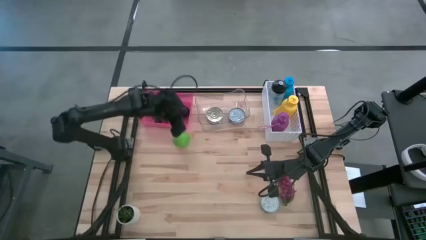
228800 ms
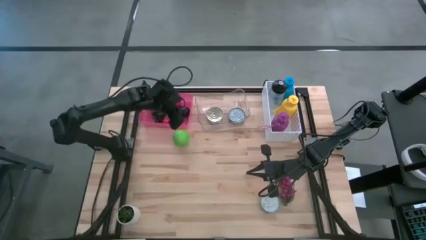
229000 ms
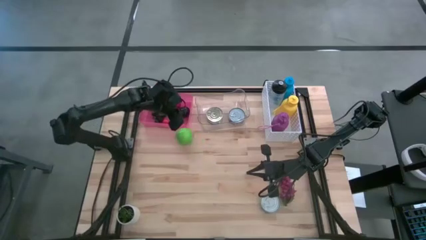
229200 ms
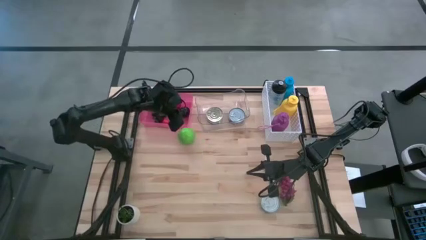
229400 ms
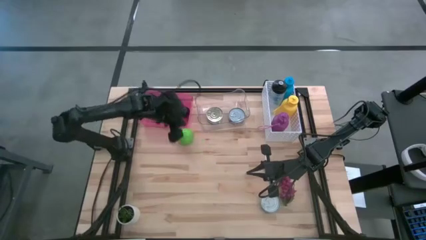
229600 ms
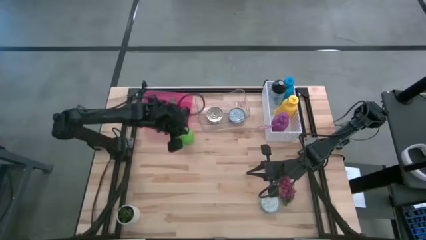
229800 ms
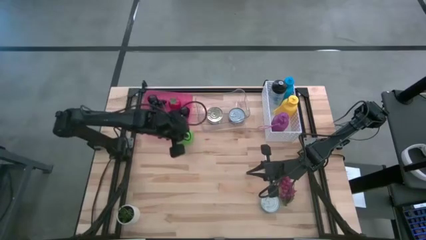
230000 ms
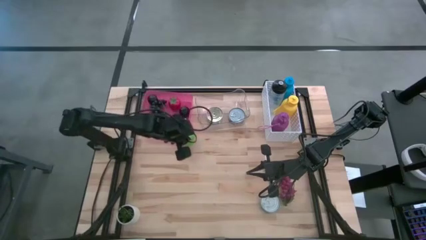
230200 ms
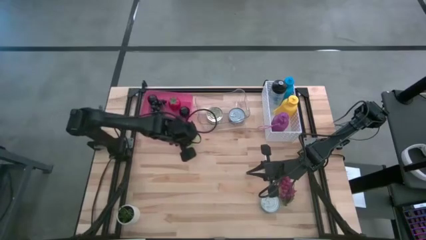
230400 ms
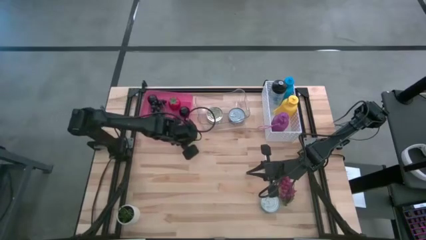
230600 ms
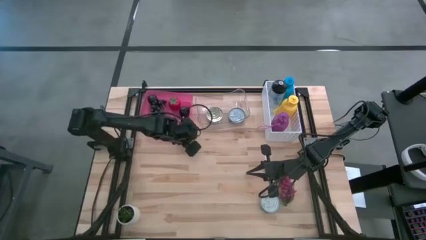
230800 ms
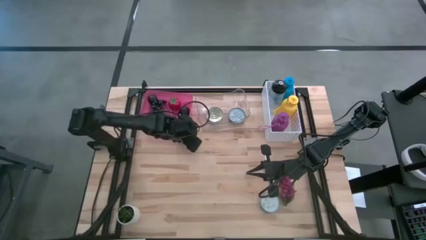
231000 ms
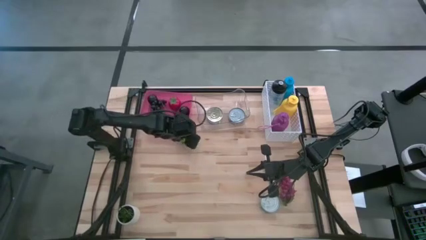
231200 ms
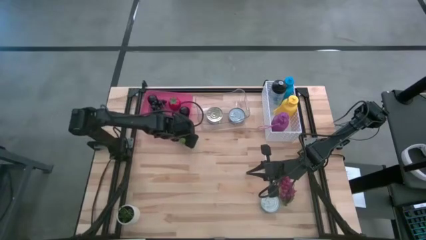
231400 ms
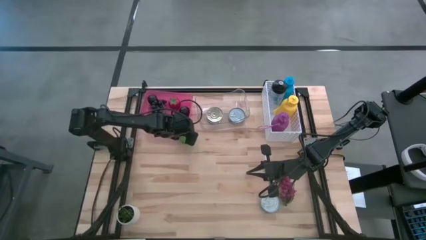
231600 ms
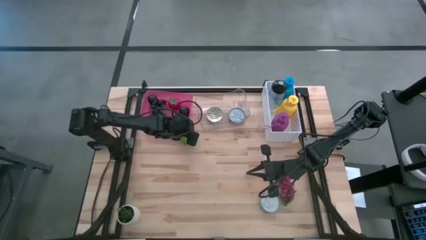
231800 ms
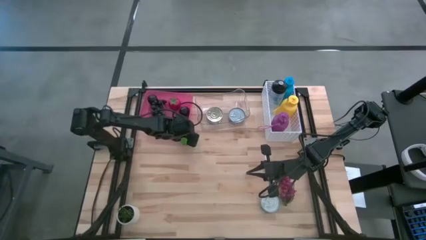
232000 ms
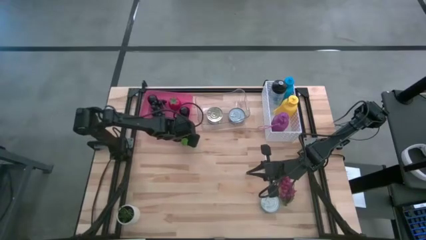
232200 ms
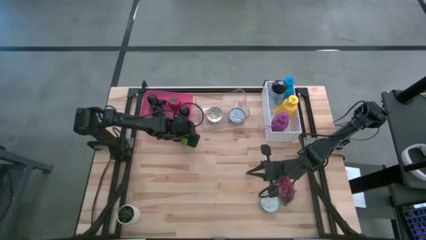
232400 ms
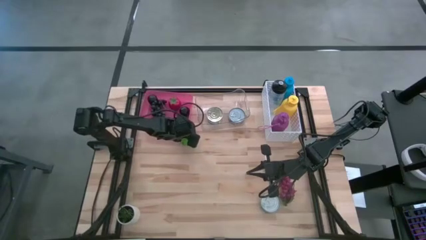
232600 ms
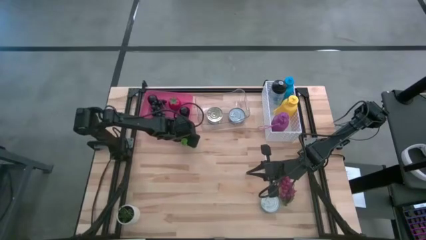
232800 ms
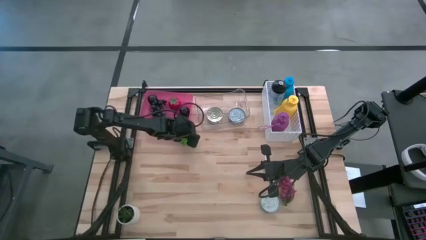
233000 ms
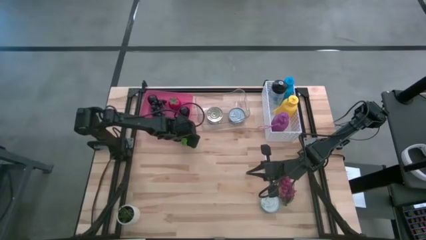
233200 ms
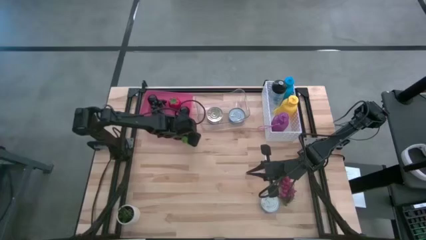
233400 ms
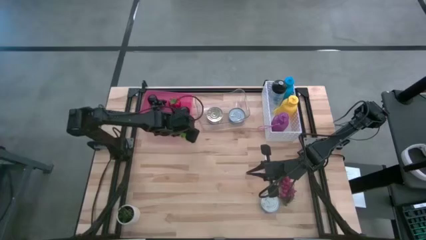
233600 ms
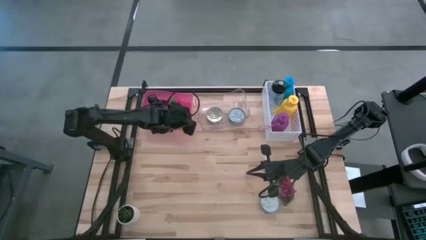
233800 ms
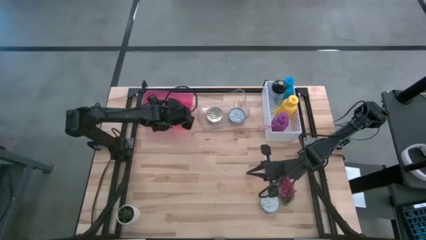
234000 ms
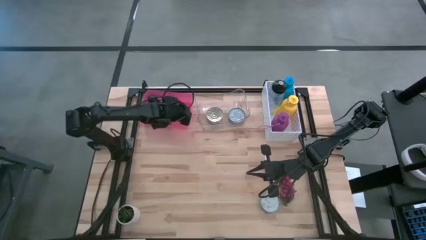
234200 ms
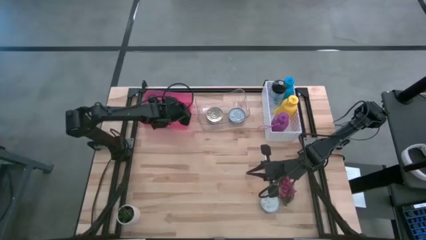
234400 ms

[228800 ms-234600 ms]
Task: Pick & Place Food Item
Put the green apple into the pink bin

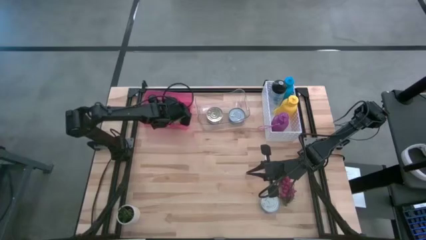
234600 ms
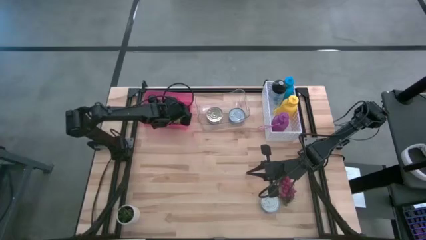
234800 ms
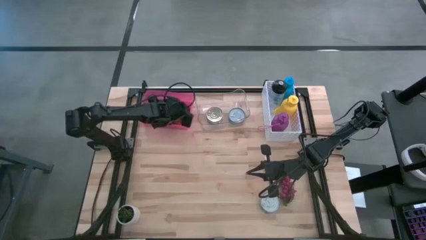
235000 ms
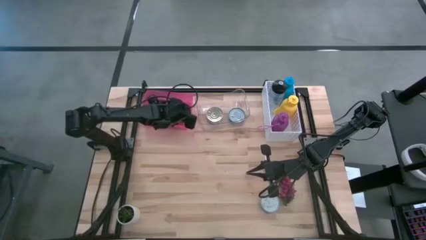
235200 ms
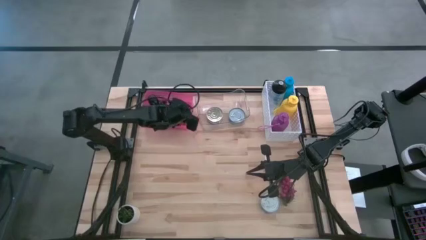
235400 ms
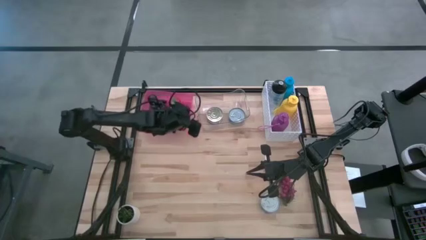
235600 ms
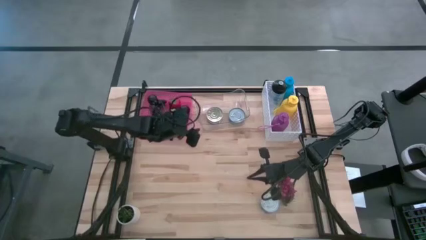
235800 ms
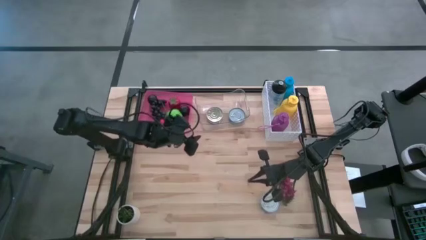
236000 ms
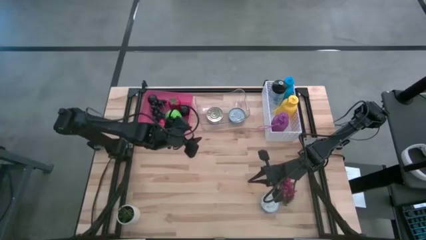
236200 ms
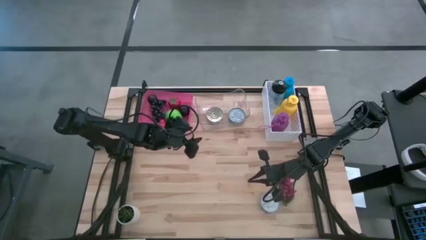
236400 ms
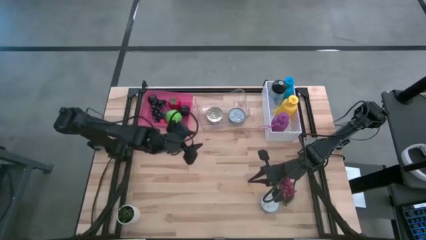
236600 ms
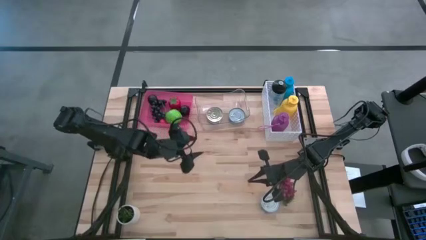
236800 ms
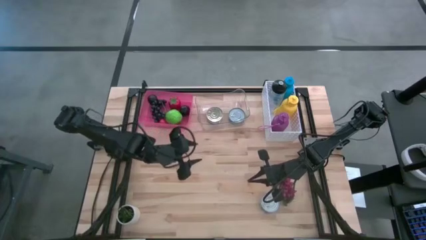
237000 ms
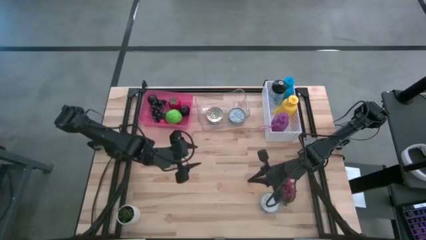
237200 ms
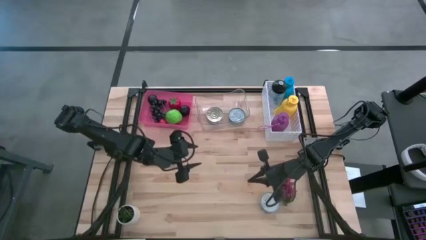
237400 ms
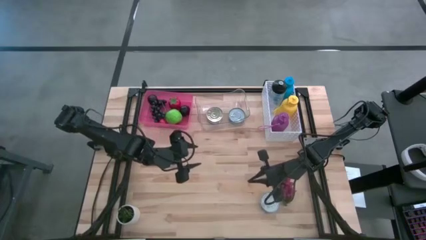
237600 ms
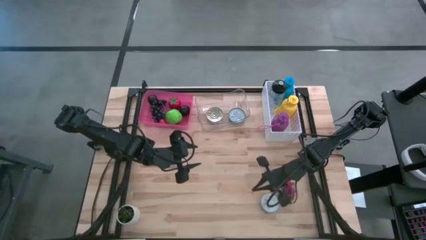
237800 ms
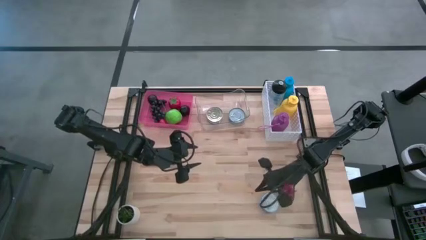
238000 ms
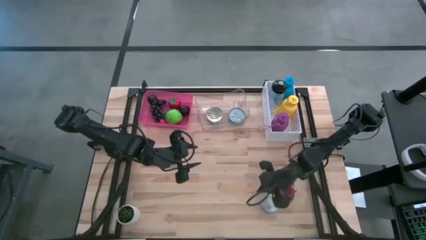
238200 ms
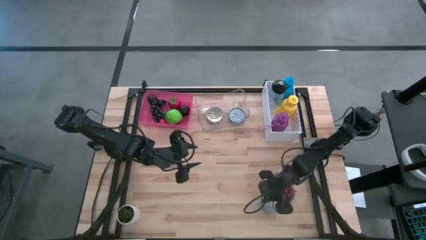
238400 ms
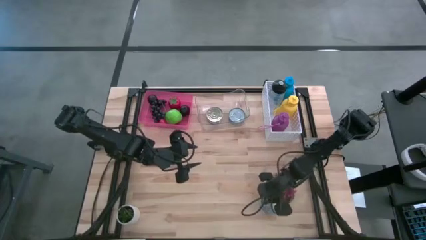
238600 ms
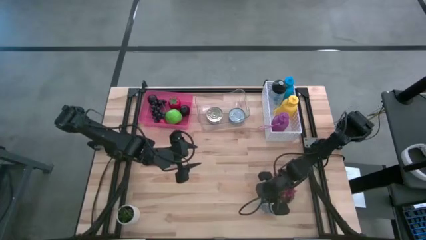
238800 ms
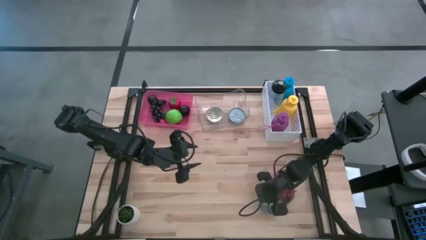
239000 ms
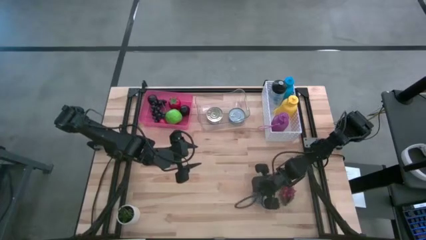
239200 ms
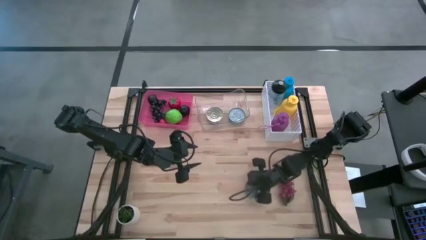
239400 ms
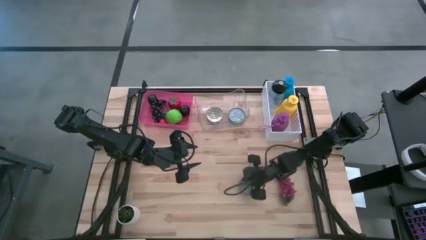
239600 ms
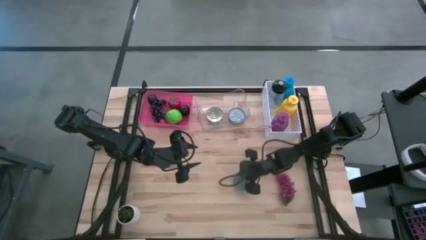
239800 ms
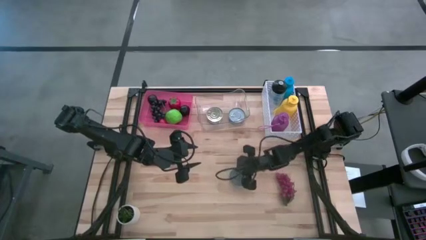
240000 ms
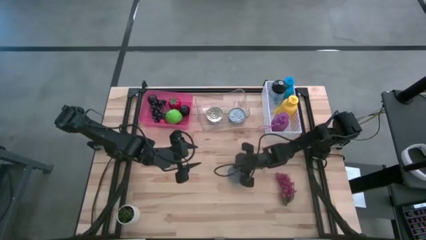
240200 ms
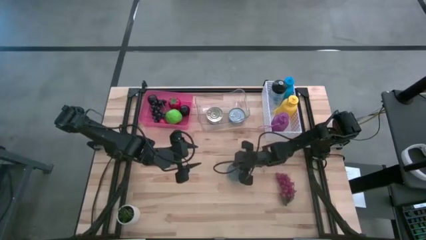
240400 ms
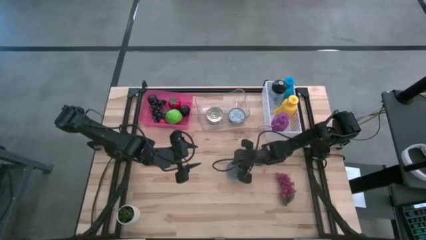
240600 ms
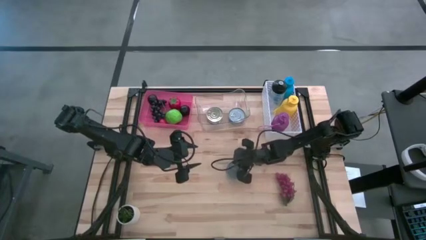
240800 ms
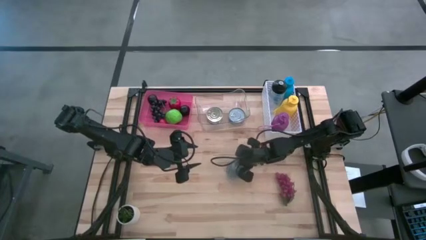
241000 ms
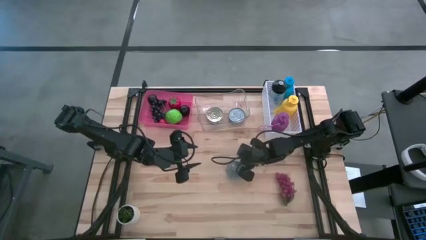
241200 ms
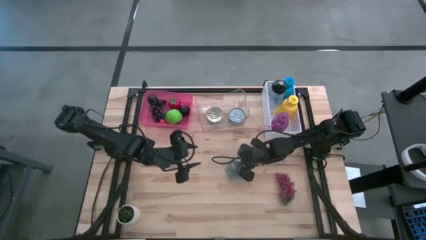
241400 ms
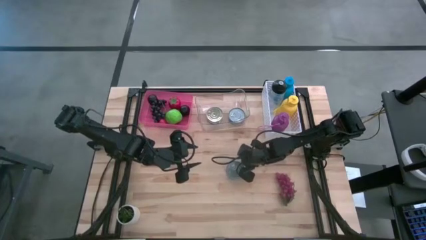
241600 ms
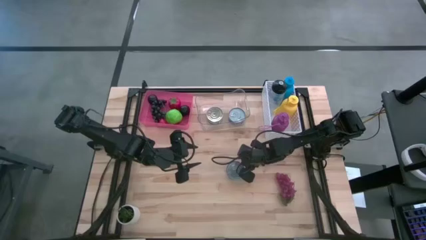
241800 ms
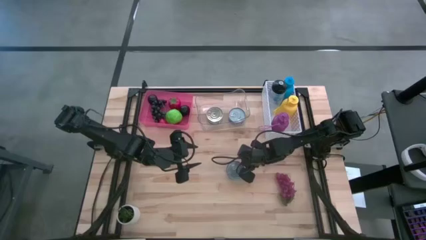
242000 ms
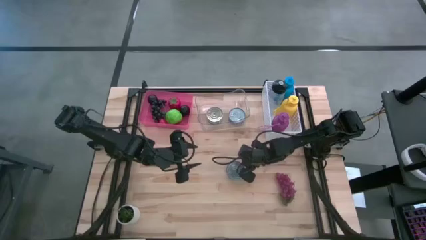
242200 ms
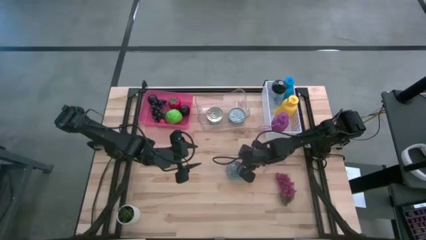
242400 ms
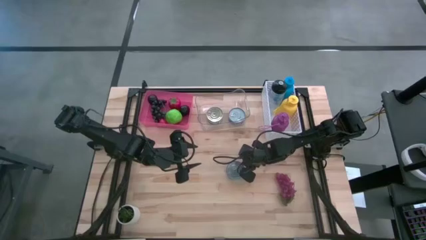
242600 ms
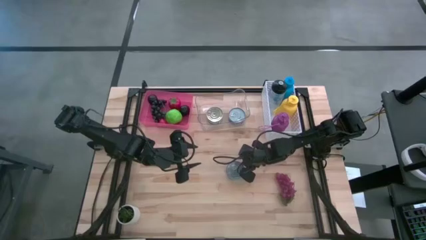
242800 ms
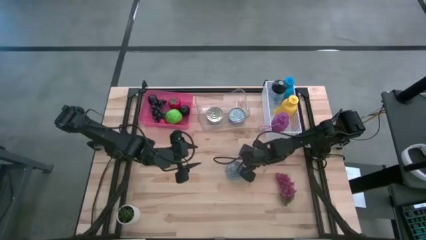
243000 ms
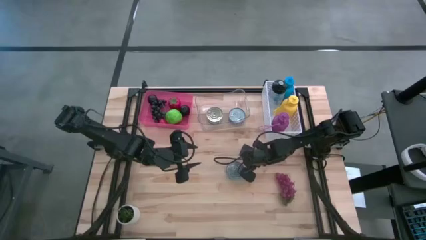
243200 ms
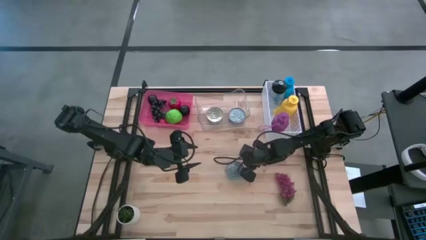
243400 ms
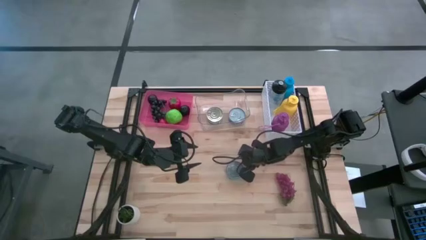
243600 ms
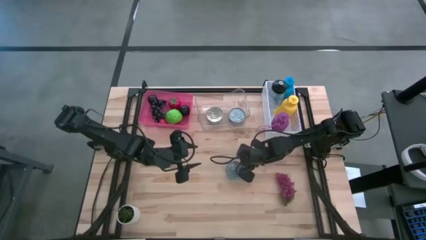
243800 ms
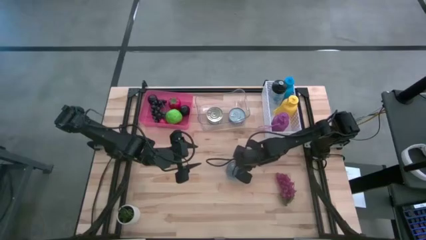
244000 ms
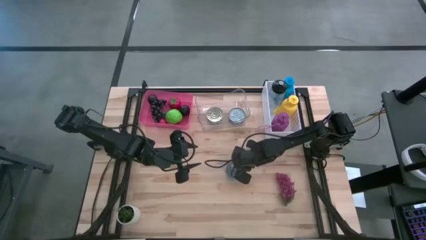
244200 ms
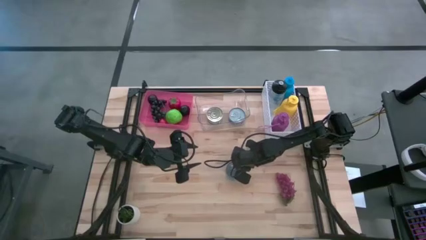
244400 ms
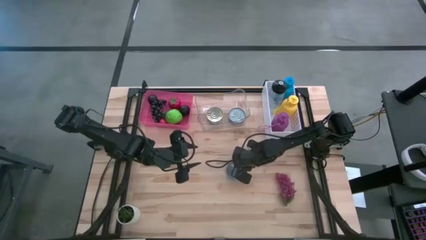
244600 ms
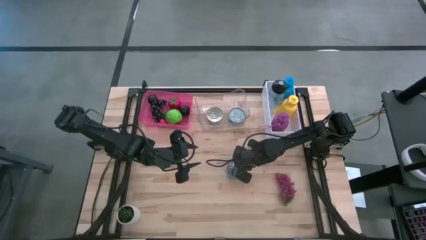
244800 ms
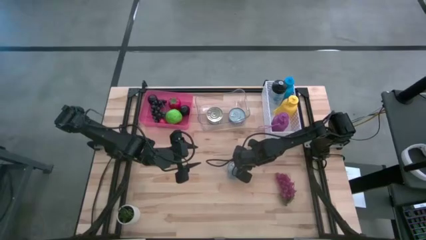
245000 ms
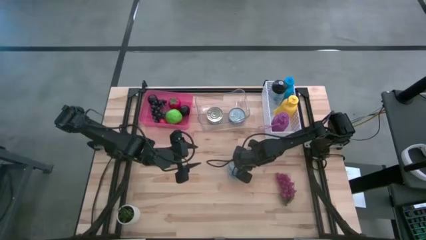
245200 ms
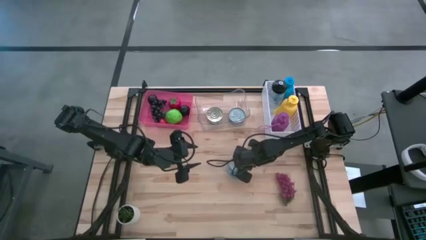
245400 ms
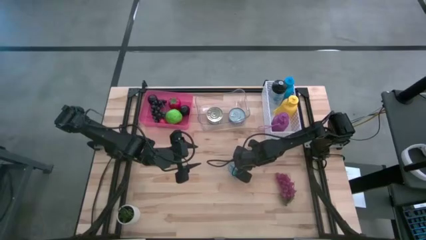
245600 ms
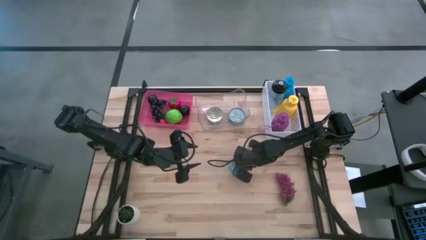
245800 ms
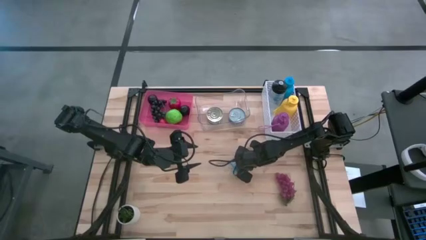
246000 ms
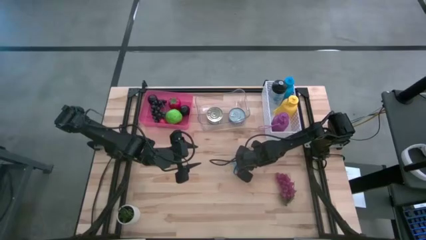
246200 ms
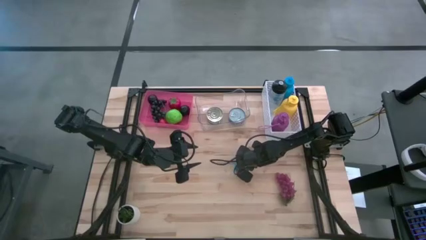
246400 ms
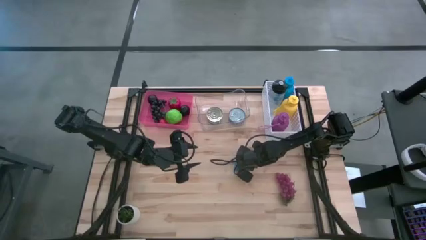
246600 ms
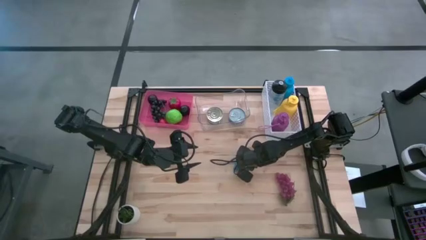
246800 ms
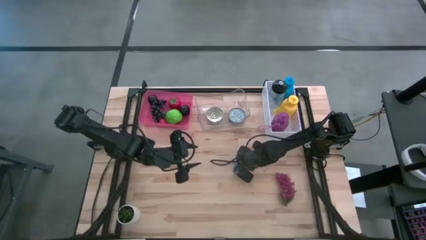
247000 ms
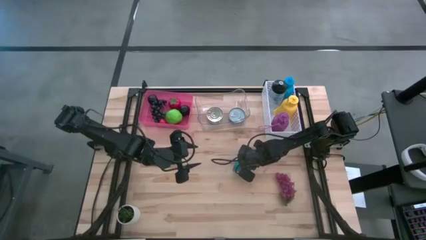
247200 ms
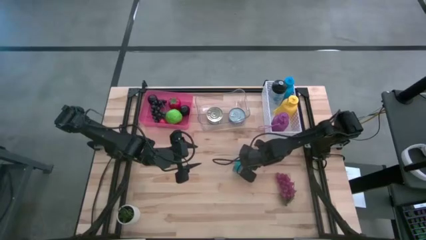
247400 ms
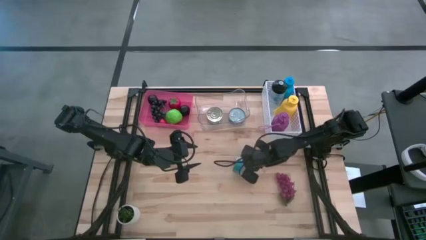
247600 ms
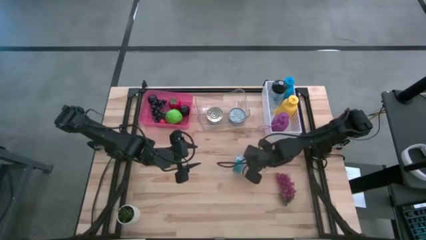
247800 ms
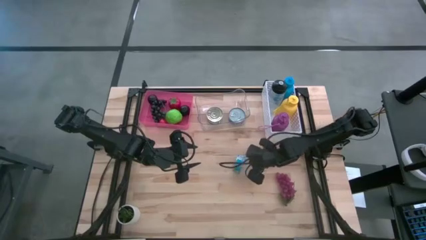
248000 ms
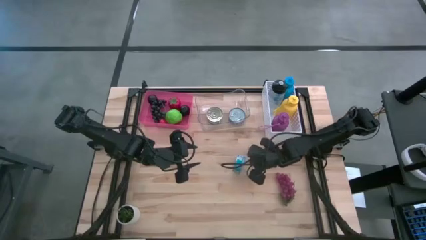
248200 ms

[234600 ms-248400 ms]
Put the blue tuna can into the transparent bin
